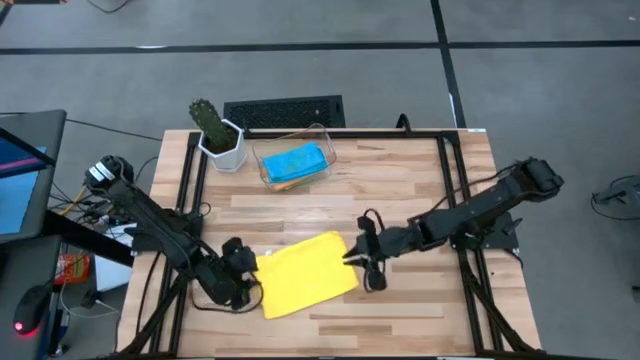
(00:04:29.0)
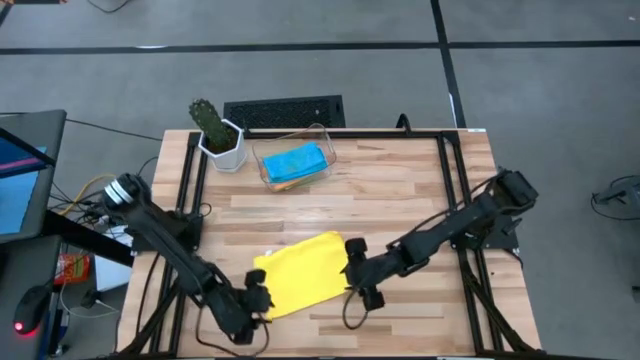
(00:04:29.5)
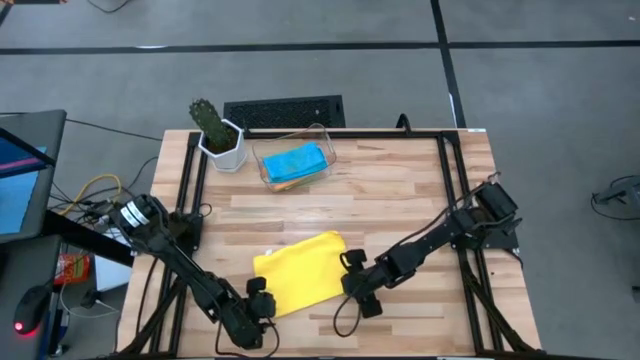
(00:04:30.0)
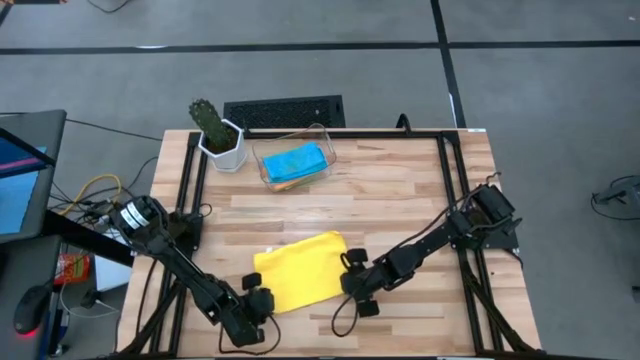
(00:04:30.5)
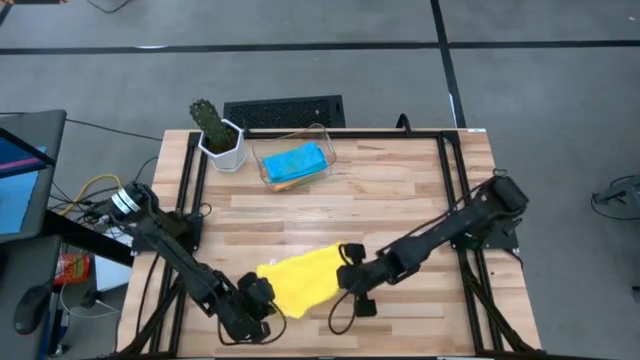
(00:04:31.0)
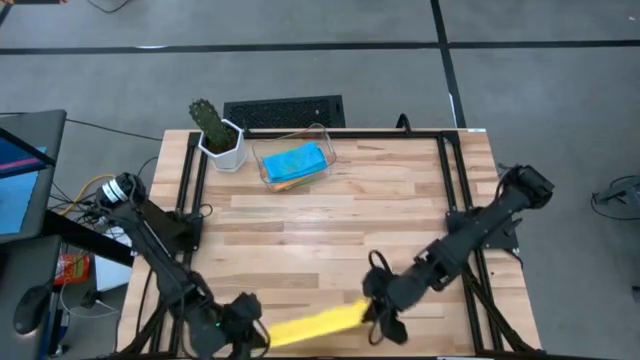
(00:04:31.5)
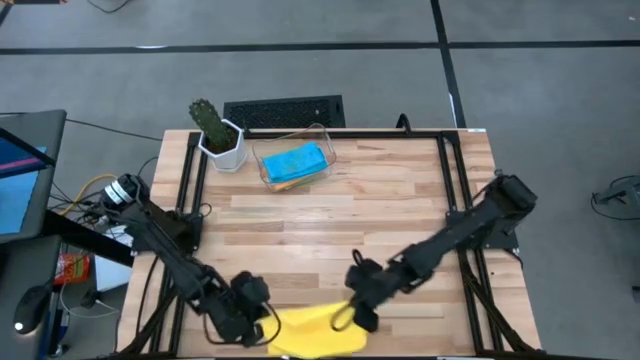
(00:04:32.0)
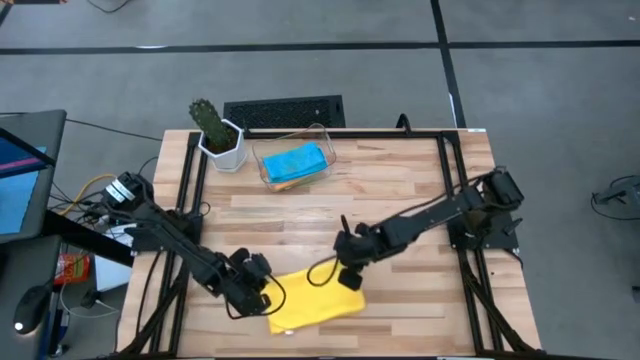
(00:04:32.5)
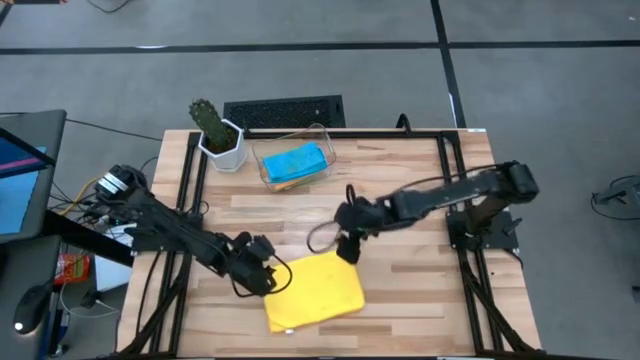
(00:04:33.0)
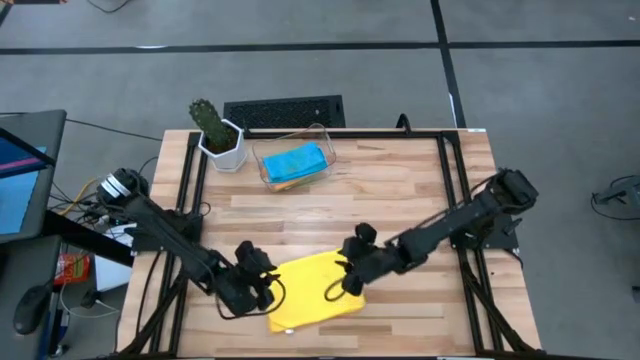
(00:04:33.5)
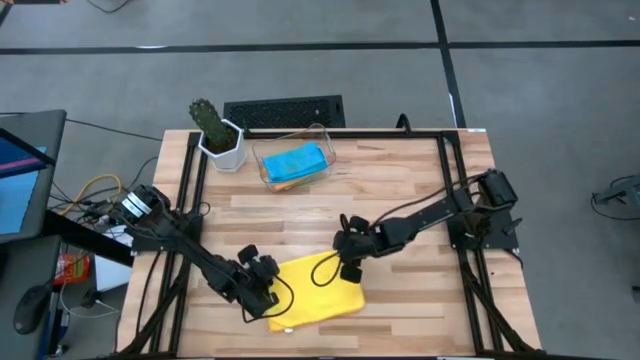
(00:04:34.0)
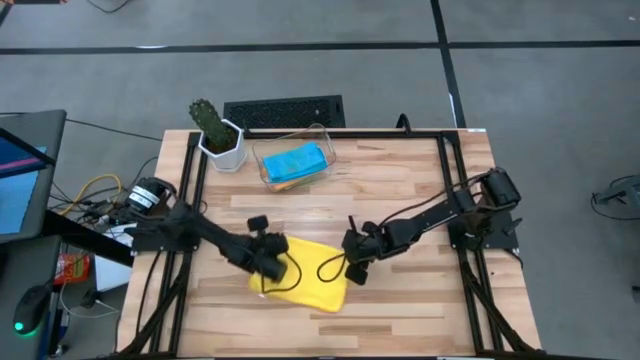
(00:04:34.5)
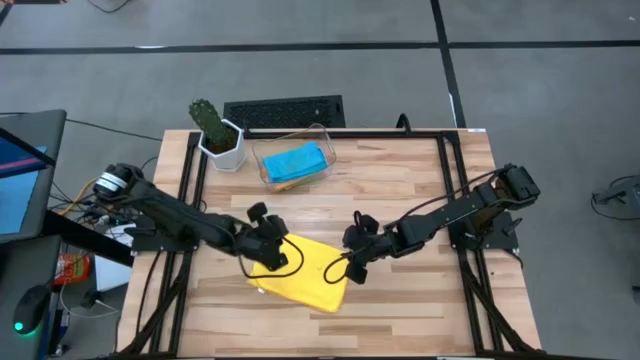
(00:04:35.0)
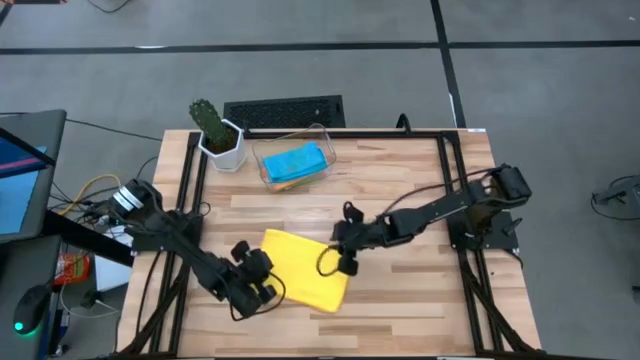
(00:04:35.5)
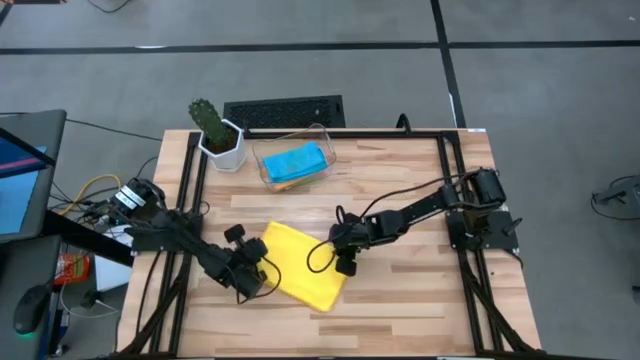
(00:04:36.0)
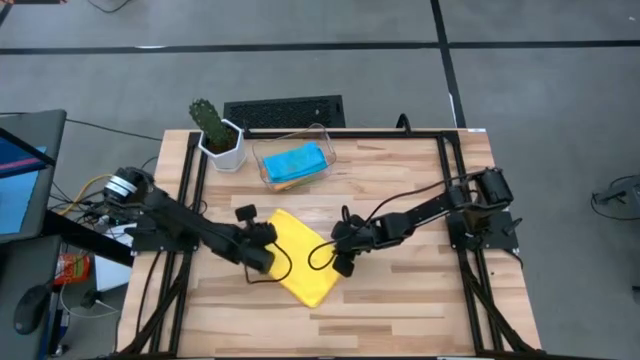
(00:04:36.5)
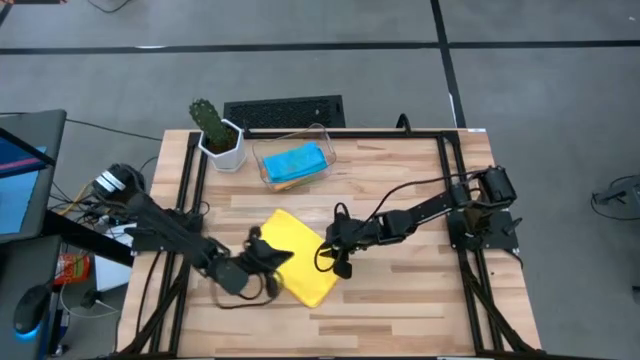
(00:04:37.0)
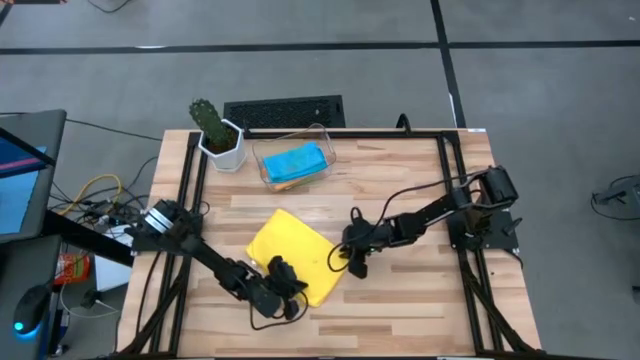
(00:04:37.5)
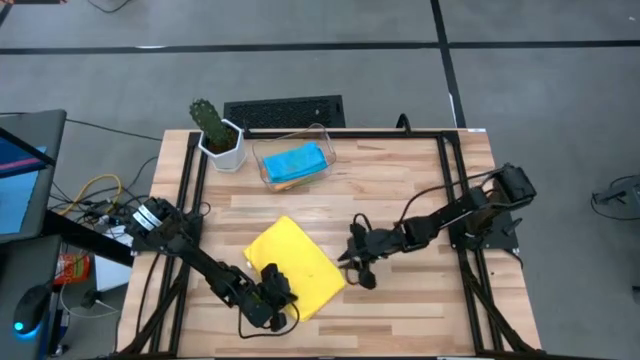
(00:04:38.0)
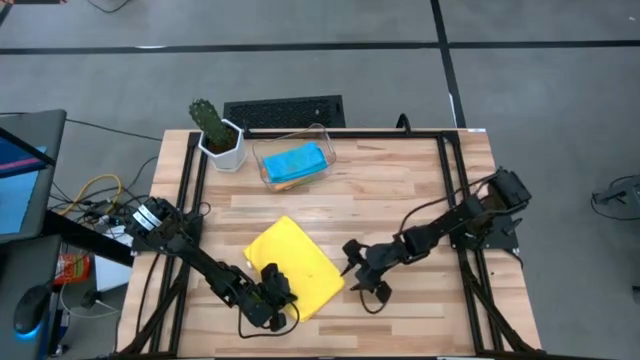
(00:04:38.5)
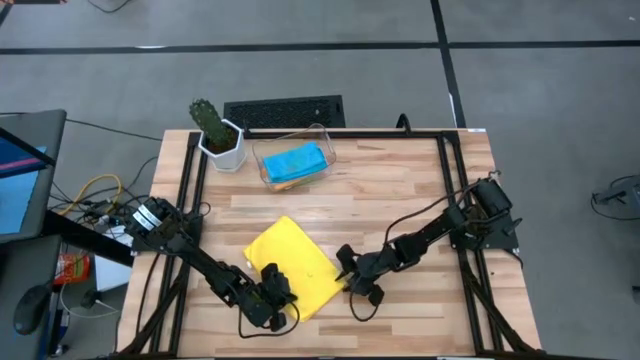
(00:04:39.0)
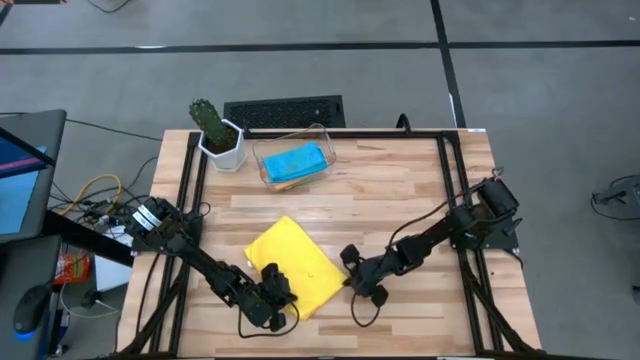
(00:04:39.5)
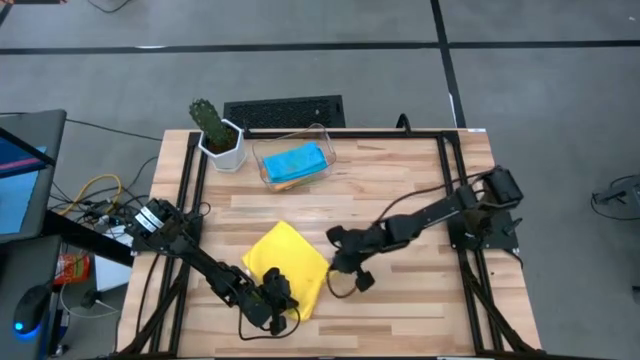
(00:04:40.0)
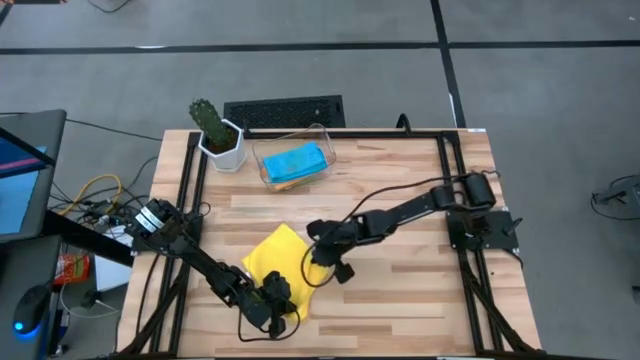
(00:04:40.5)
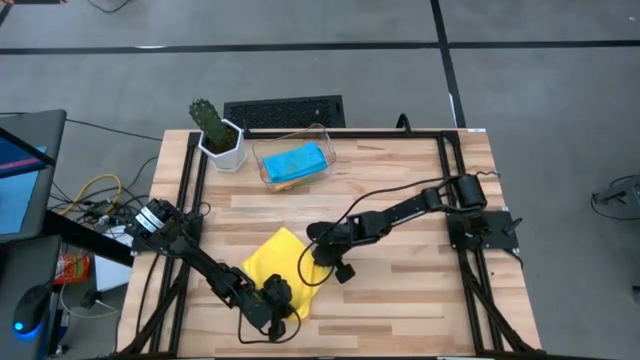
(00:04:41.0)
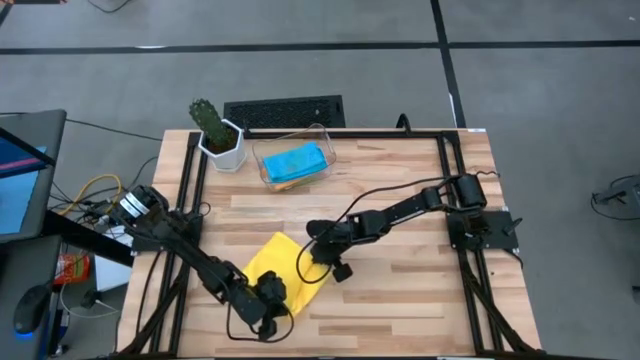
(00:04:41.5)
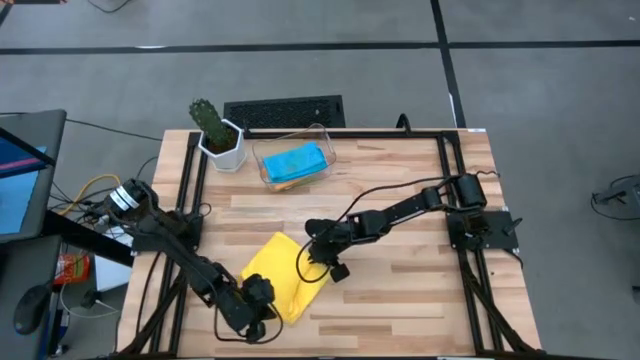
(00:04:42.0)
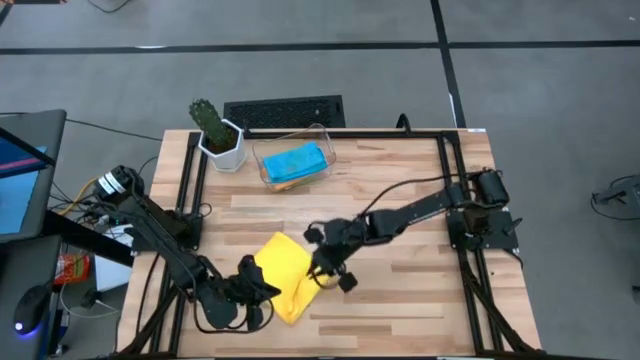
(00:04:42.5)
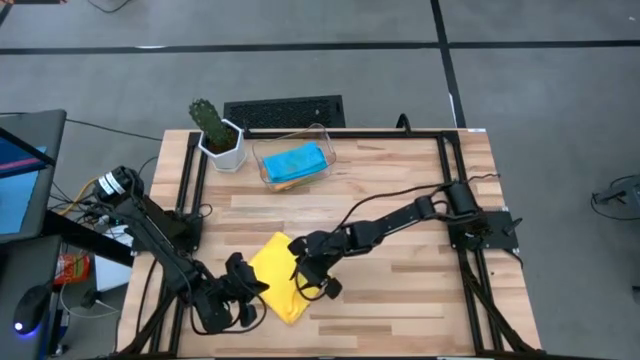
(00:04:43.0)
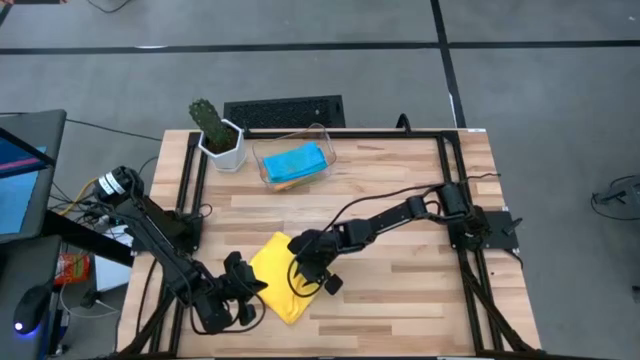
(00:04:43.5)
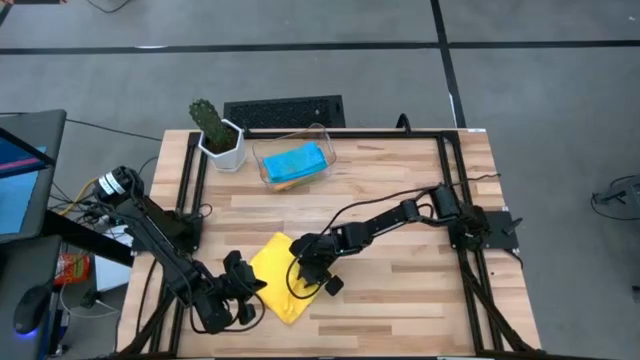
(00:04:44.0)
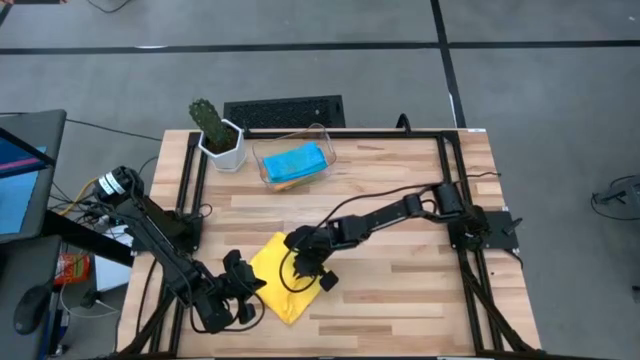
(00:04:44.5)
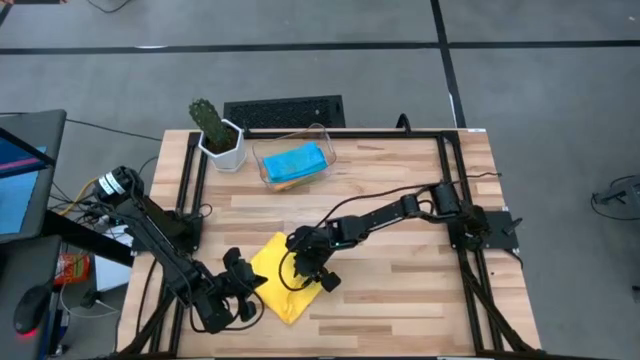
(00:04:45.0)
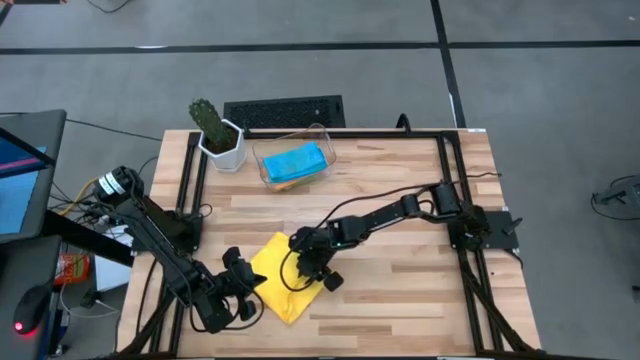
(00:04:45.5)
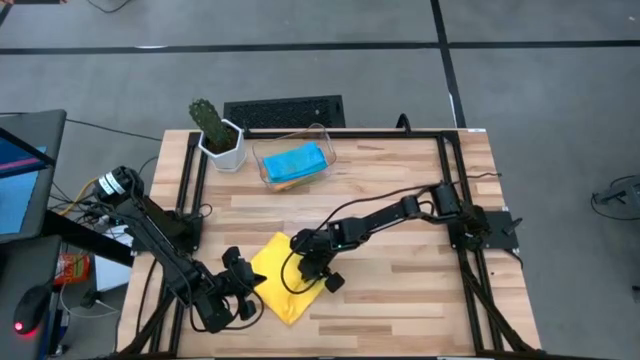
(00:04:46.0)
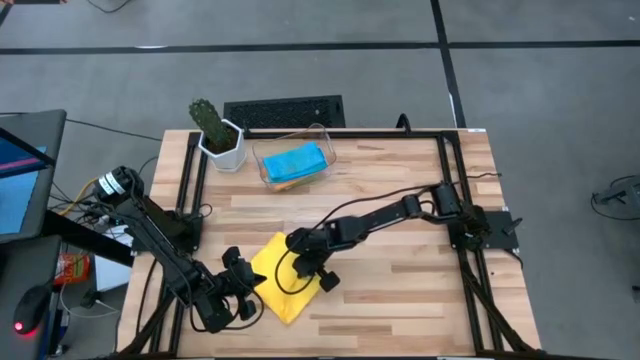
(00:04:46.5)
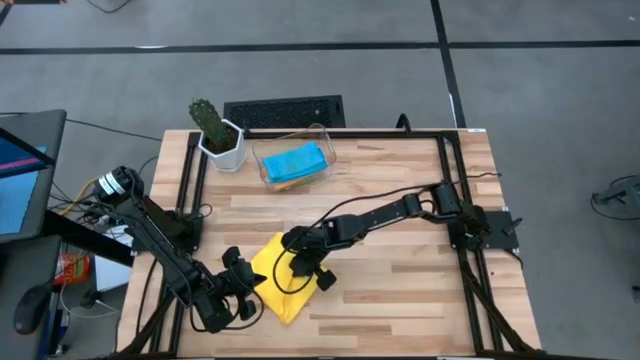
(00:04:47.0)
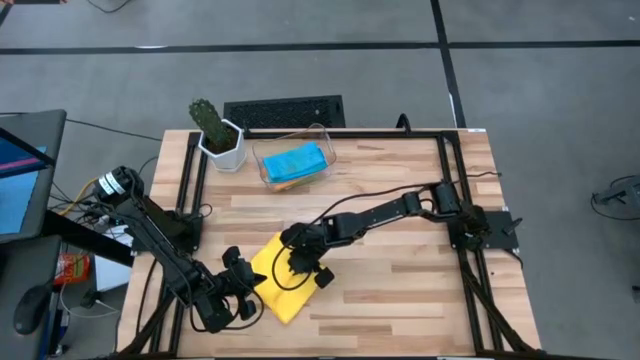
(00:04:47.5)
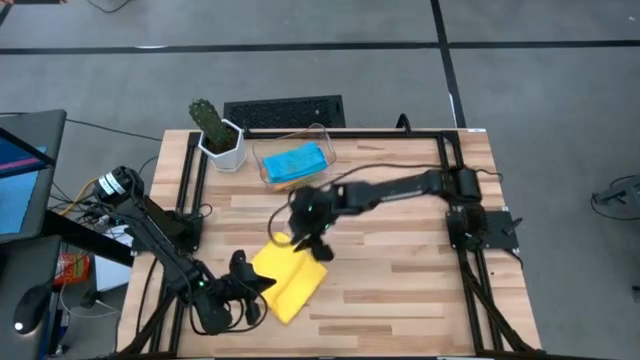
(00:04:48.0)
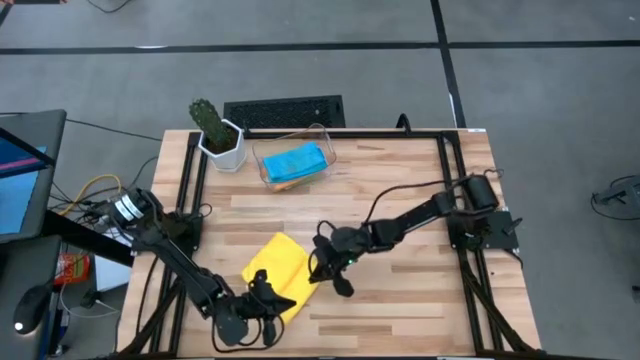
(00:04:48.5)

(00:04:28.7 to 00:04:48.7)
Task: Fold microfiber towels
Fold the yellow microfiber cloth
